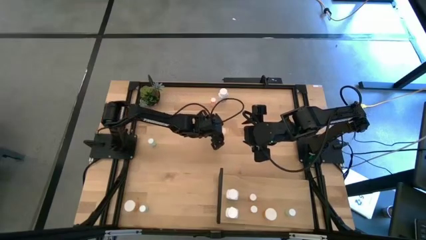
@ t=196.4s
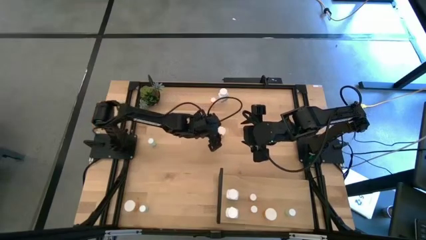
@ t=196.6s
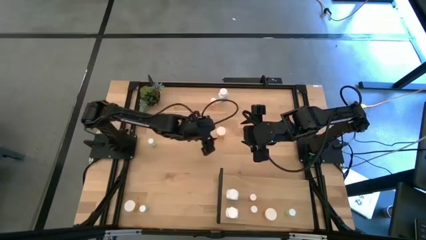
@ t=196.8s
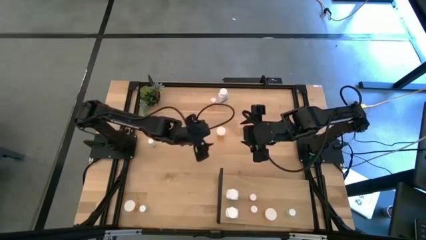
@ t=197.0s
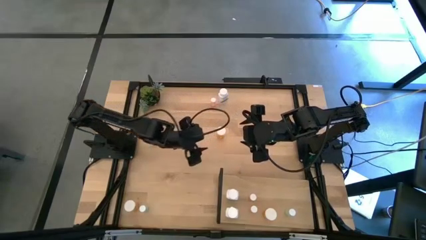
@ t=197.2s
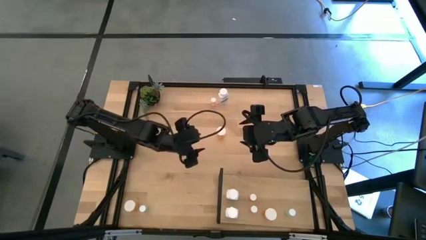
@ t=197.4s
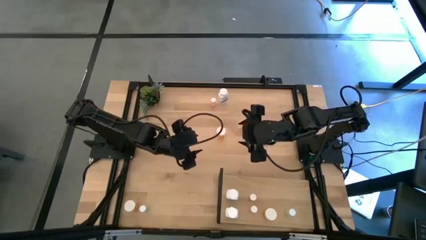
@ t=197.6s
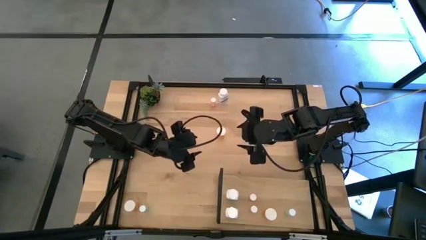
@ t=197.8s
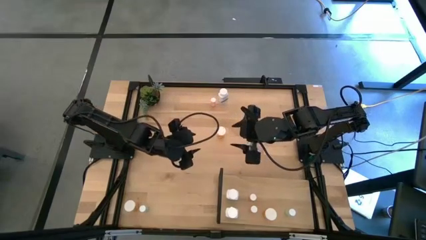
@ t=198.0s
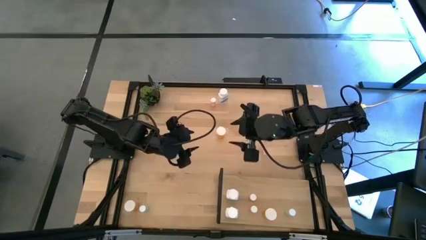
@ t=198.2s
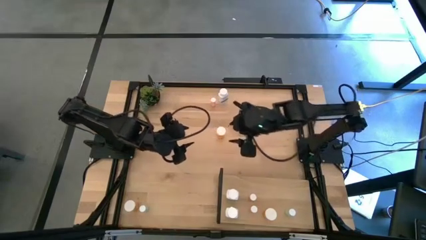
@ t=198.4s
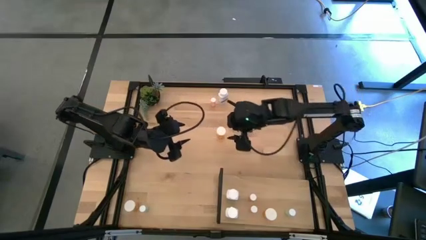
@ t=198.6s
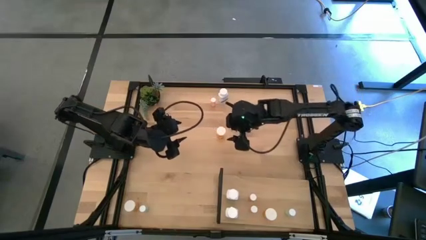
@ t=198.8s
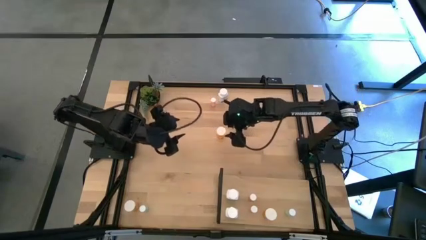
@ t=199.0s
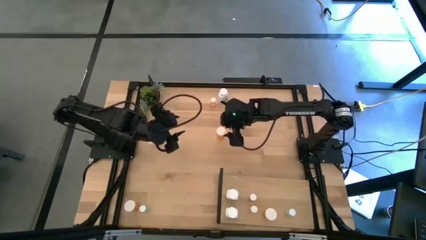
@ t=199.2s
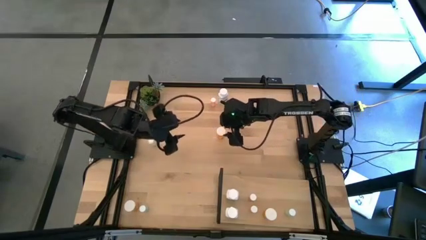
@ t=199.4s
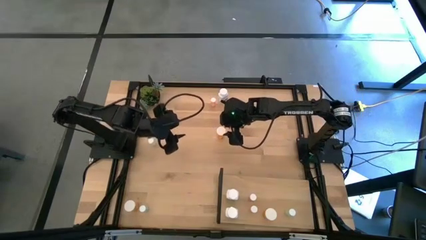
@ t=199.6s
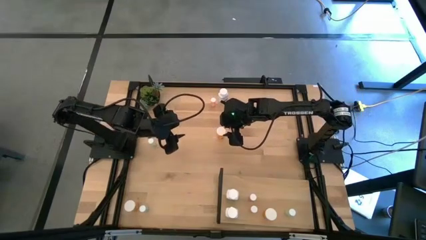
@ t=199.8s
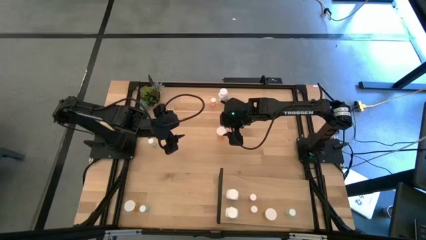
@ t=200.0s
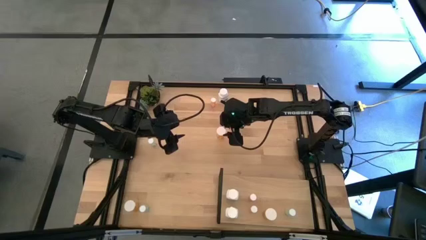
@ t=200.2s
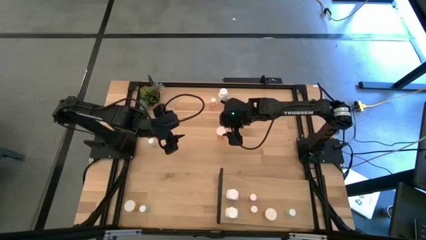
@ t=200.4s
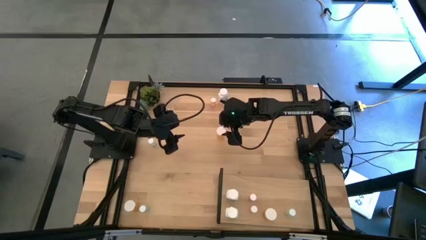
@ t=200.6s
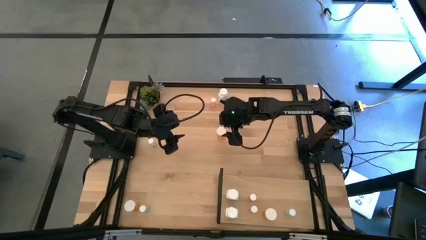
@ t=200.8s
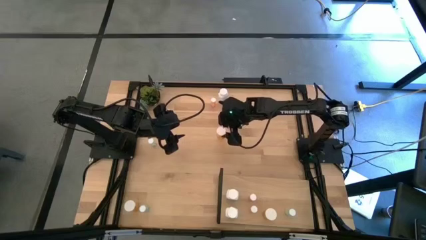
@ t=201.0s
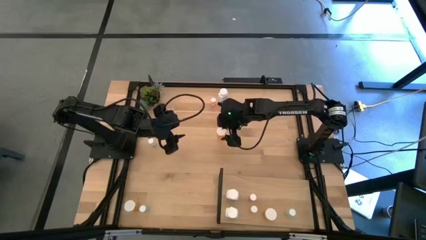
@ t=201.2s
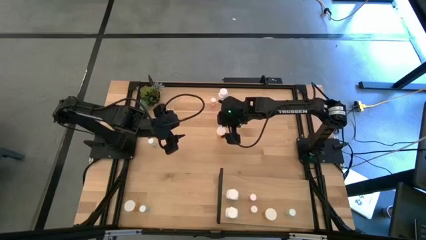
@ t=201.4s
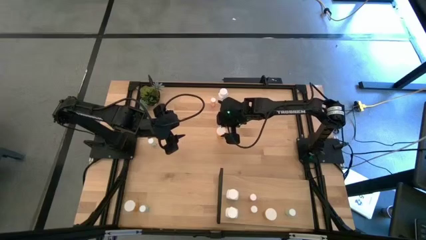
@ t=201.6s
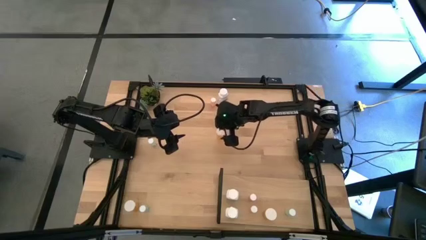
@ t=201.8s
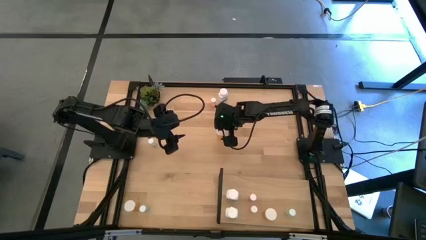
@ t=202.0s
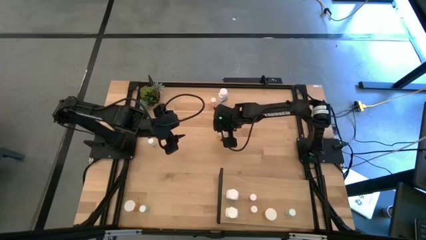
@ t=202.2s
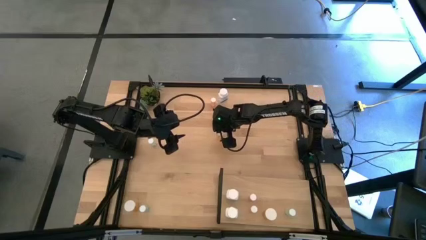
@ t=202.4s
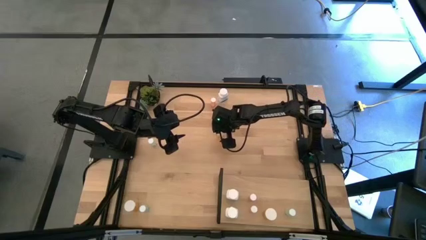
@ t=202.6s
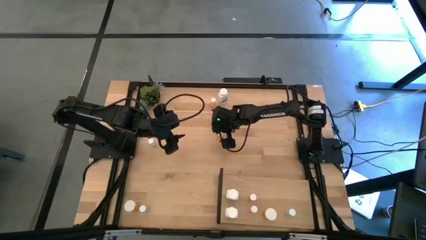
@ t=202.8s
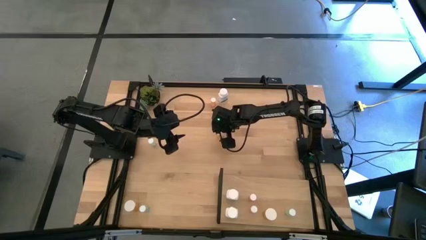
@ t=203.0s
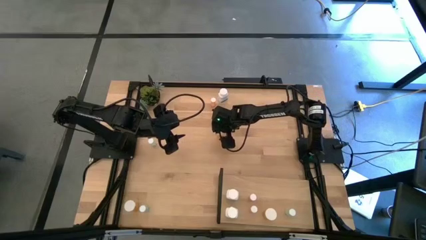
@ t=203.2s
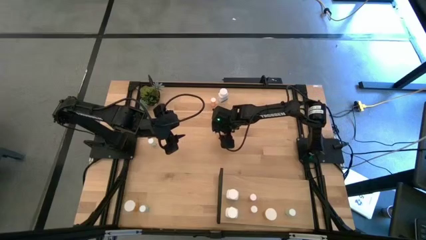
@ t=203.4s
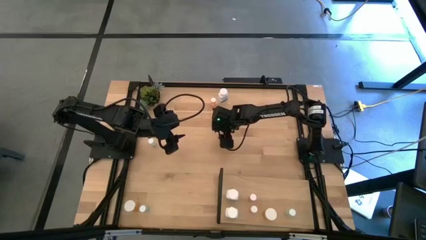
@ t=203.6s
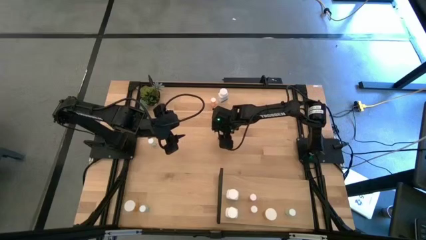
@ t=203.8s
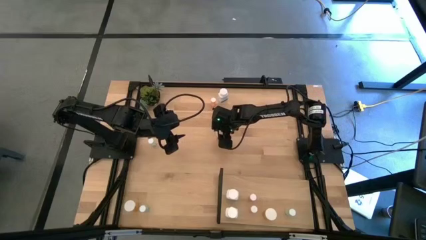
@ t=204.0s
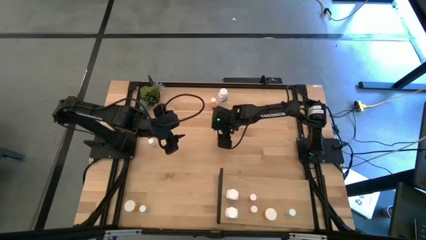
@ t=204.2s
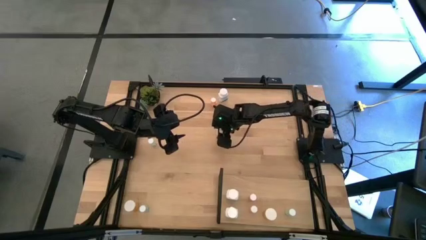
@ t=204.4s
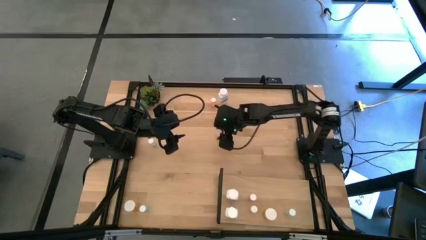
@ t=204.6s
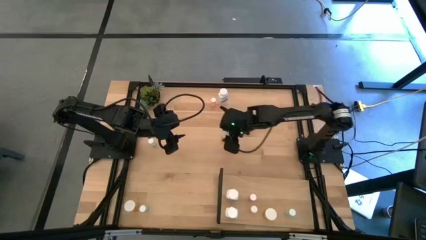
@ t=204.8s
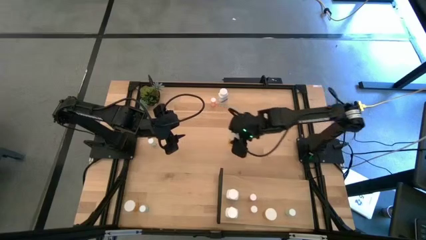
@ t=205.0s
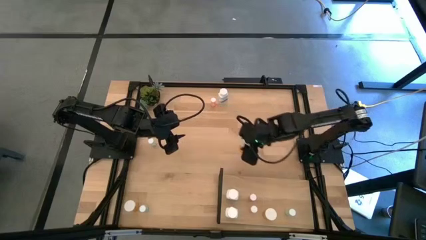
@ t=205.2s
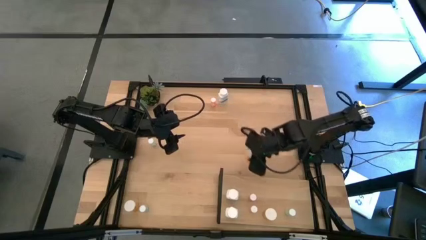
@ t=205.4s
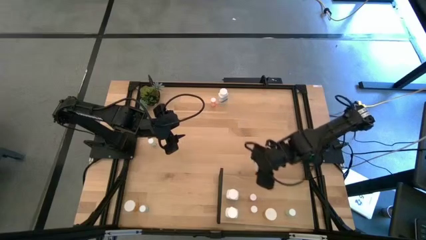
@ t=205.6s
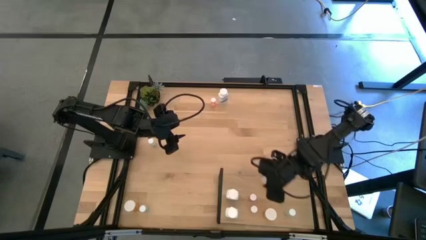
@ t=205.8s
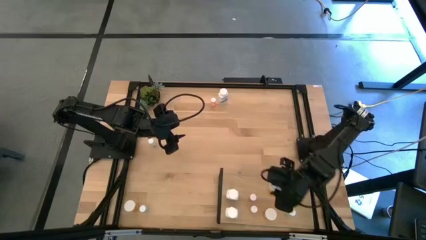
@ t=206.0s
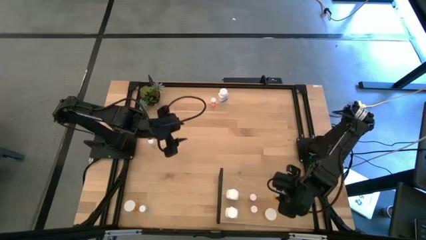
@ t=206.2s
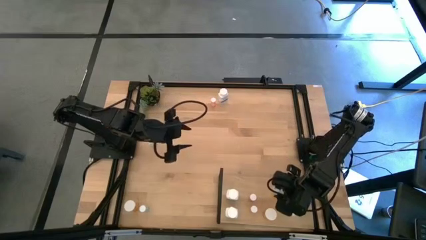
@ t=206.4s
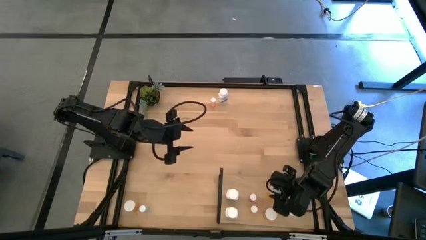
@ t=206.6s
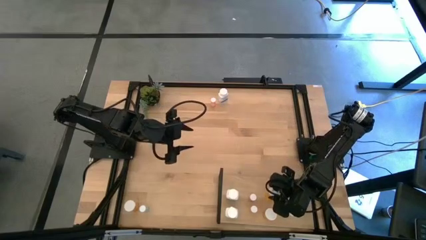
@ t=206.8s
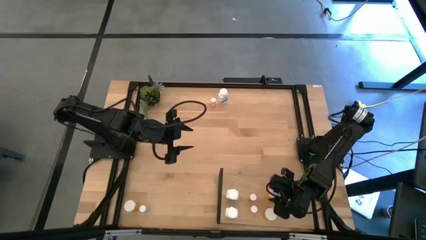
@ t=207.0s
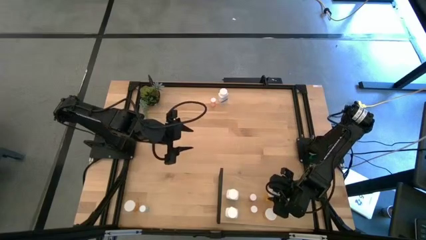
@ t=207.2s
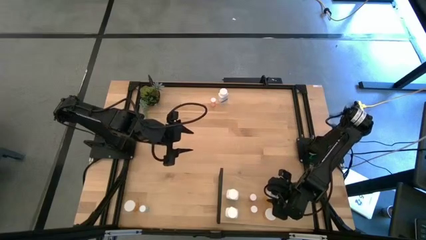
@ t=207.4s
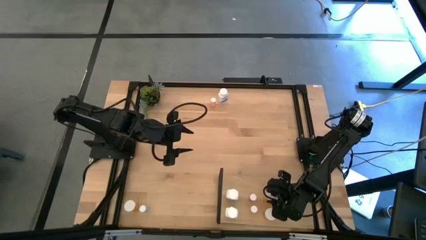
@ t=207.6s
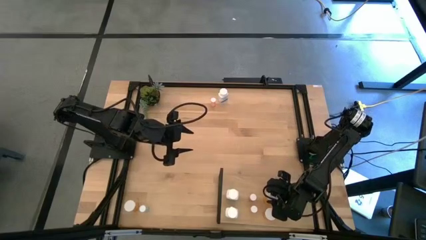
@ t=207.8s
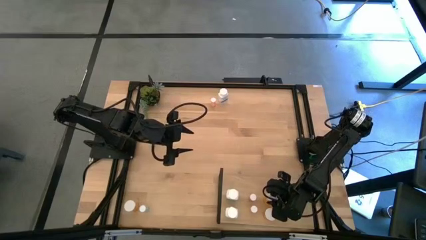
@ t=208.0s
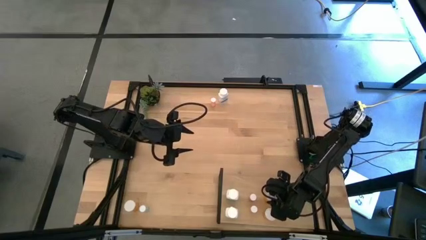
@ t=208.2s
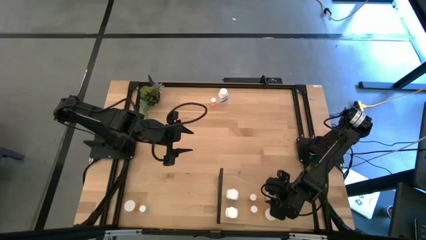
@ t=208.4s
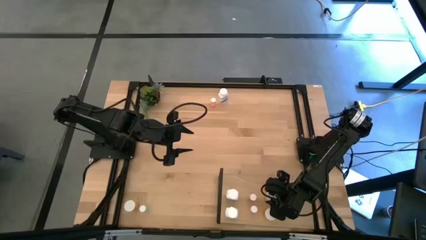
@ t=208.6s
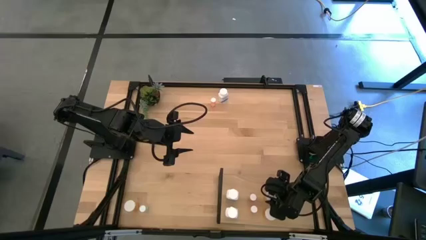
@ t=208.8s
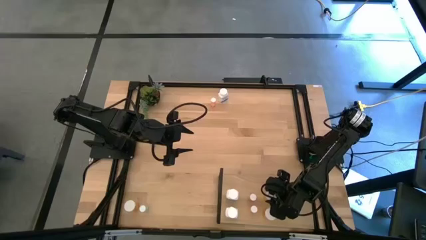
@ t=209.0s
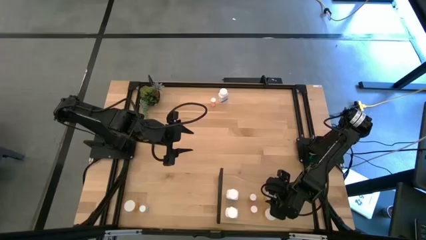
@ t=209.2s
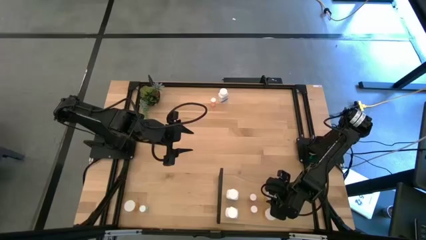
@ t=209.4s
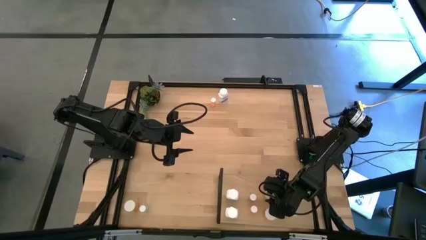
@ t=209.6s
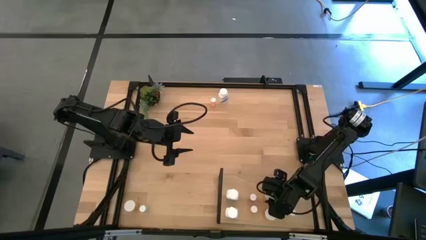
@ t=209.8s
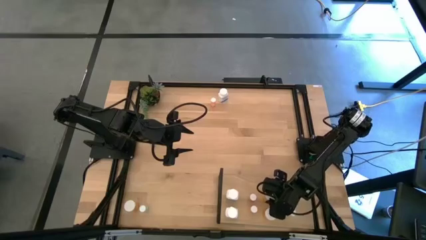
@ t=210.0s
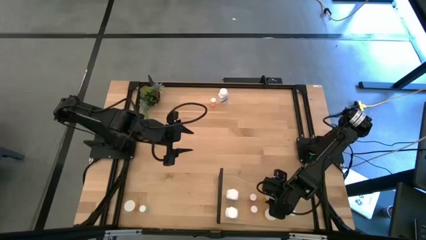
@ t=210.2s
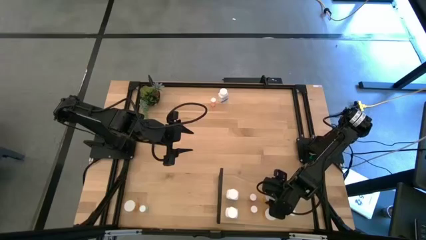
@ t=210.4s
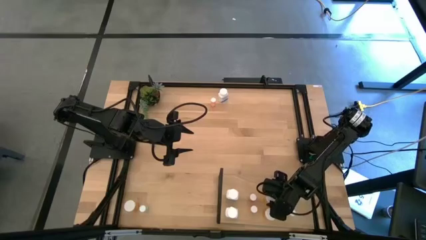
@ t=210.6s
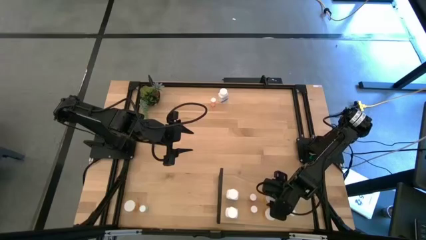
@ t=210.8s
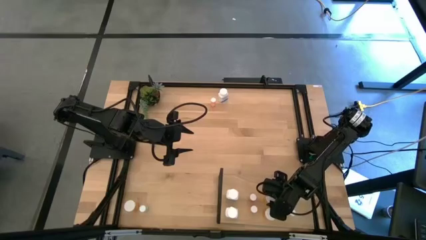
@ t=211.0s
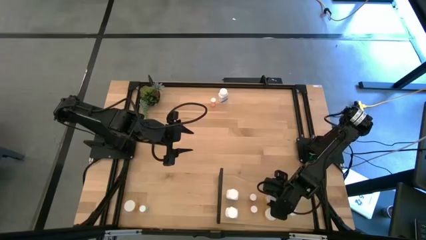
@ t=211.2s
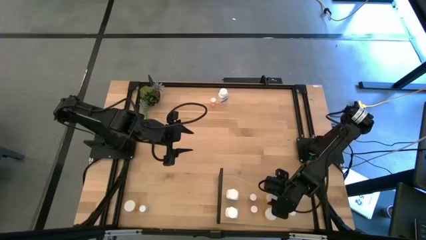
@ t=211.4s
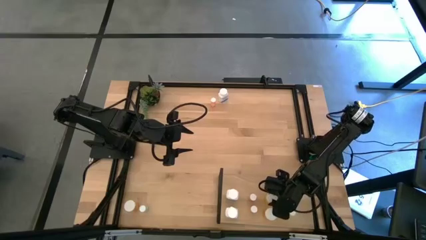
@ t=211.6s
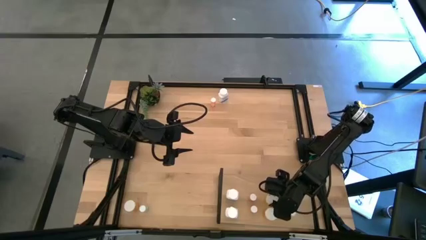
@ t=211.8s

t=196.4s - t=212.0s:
Task: Pick and place medicine bottles onto shelf by color
Put the bottom center orange pill bottle on the shelf
